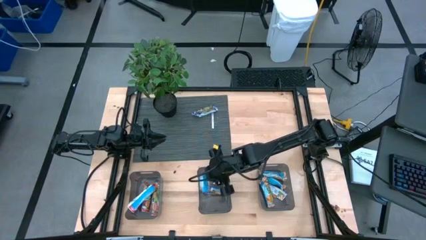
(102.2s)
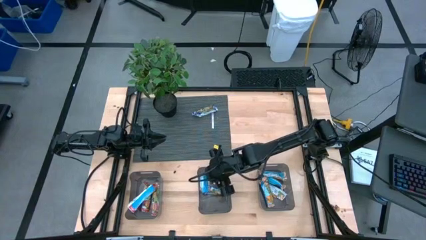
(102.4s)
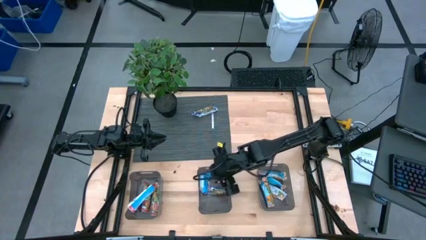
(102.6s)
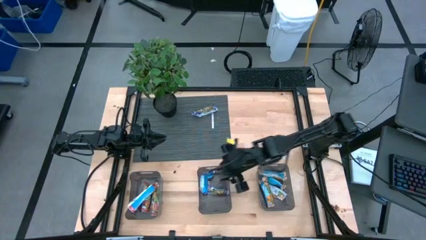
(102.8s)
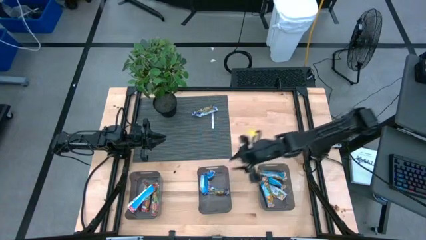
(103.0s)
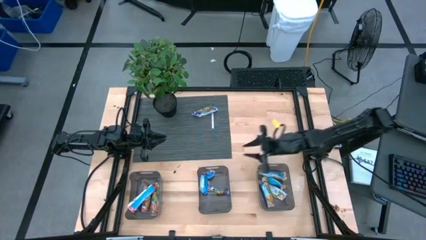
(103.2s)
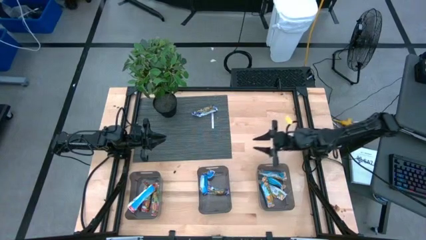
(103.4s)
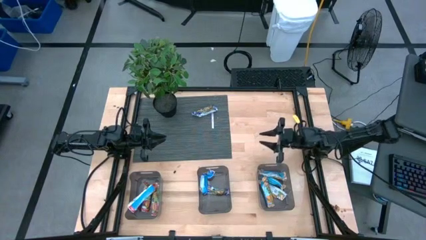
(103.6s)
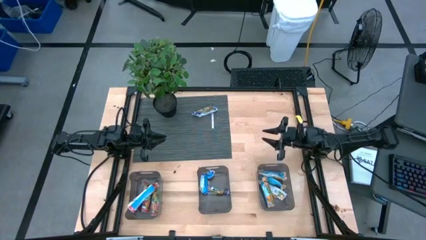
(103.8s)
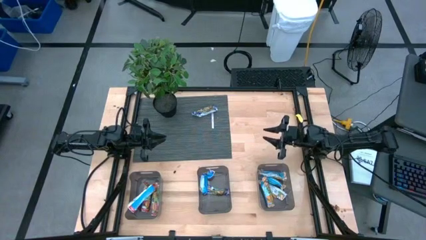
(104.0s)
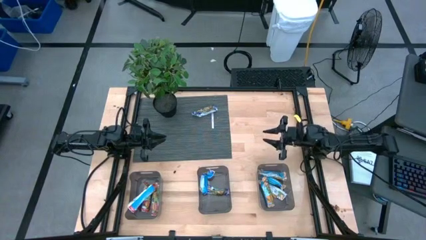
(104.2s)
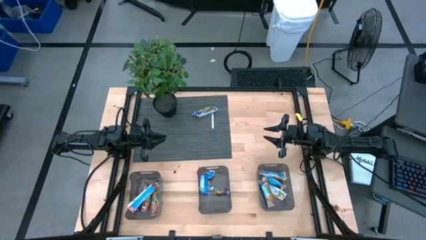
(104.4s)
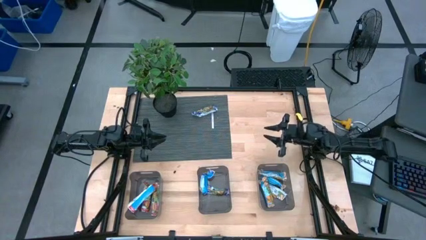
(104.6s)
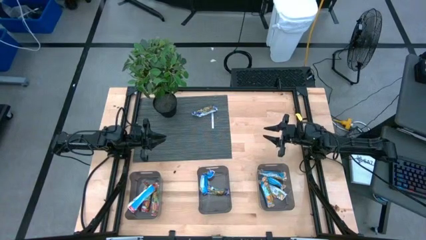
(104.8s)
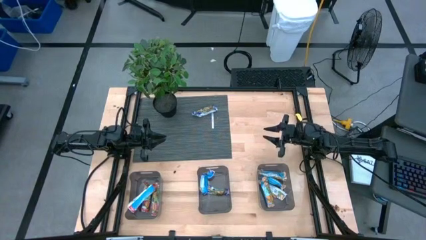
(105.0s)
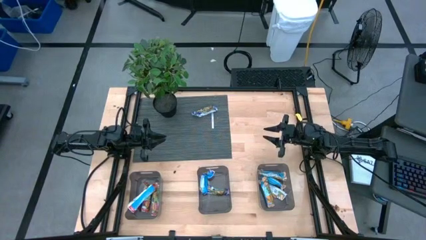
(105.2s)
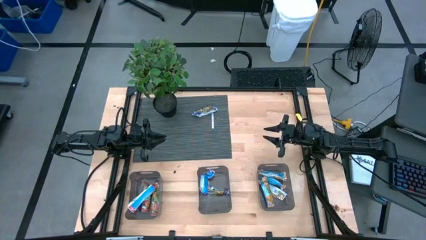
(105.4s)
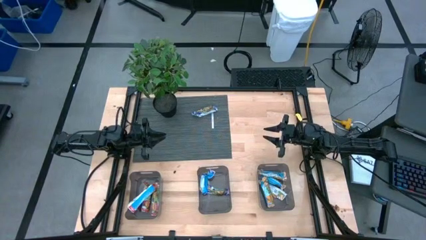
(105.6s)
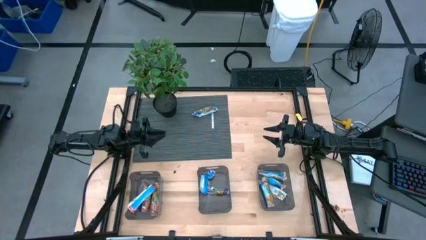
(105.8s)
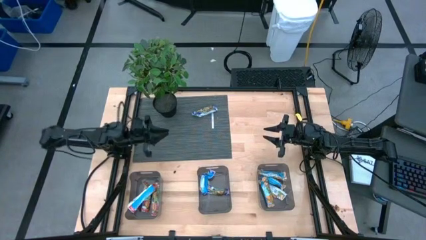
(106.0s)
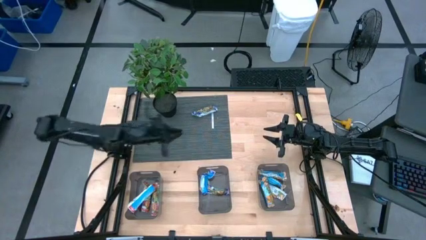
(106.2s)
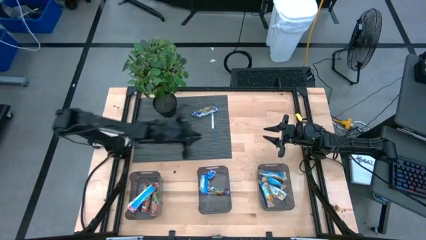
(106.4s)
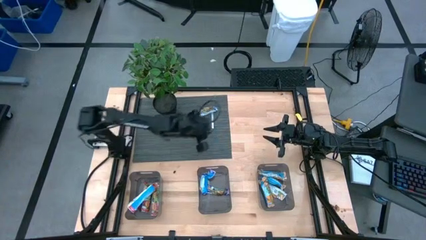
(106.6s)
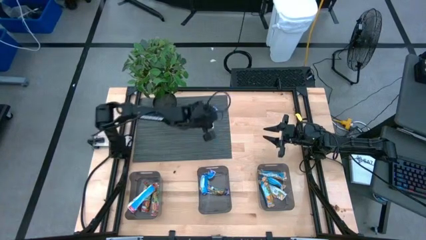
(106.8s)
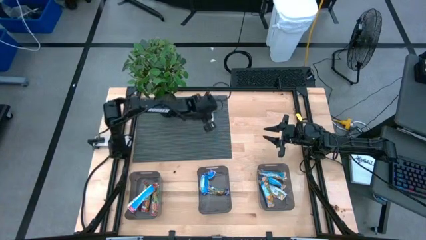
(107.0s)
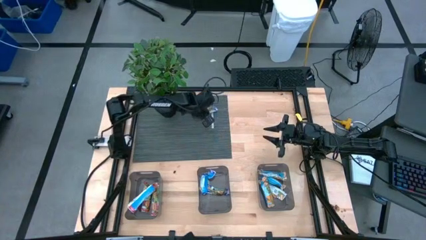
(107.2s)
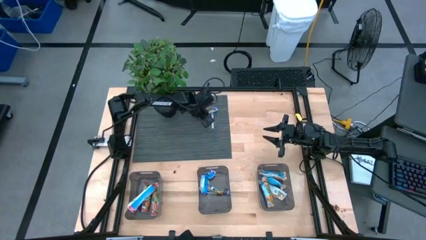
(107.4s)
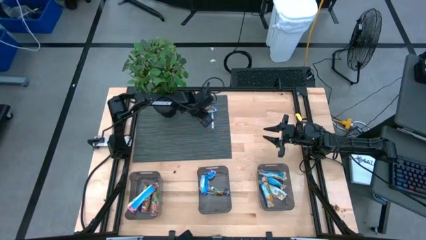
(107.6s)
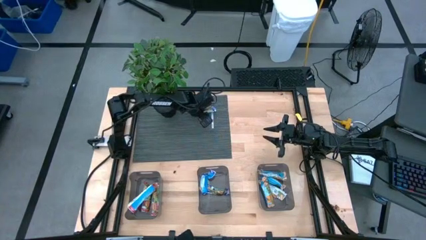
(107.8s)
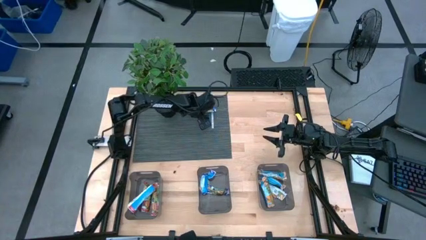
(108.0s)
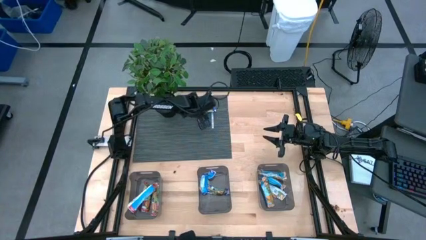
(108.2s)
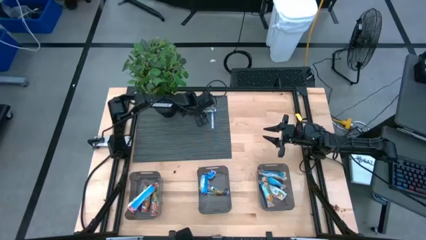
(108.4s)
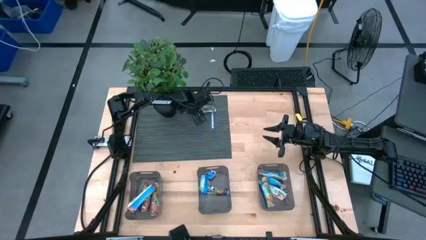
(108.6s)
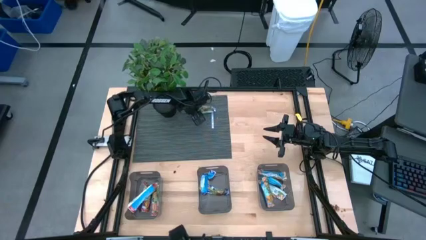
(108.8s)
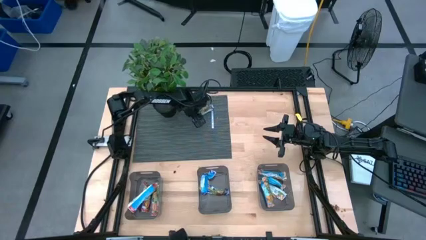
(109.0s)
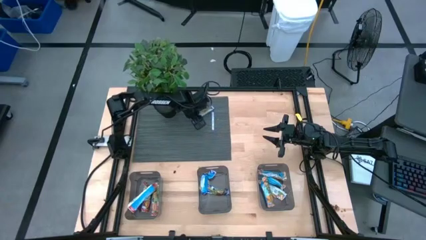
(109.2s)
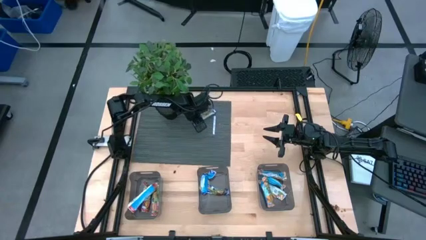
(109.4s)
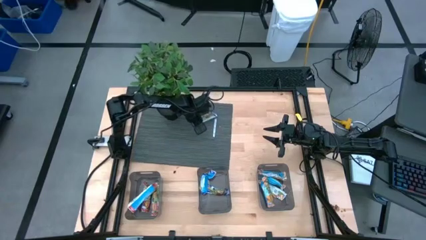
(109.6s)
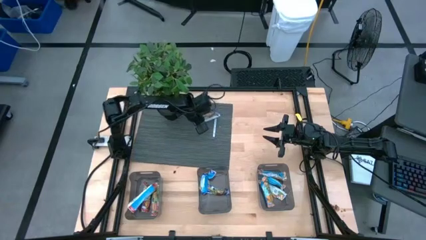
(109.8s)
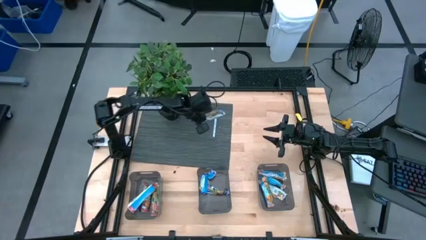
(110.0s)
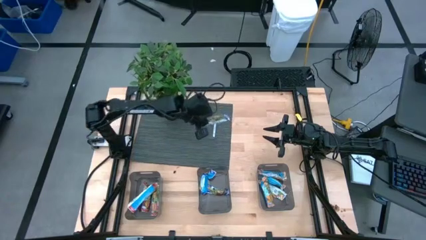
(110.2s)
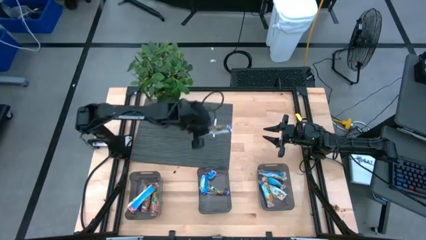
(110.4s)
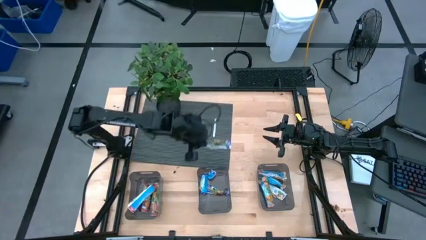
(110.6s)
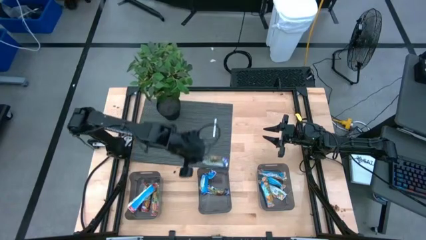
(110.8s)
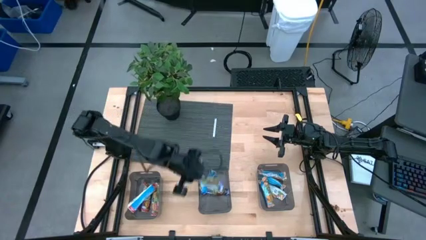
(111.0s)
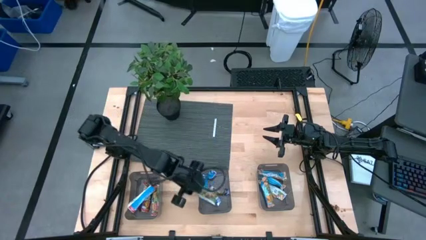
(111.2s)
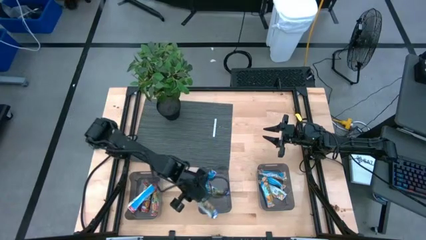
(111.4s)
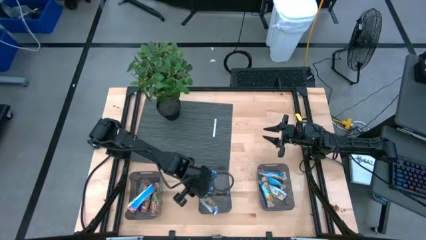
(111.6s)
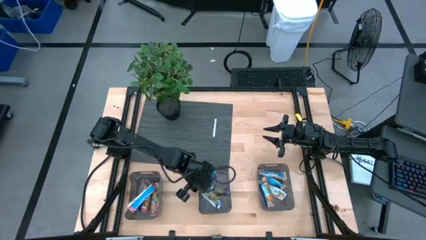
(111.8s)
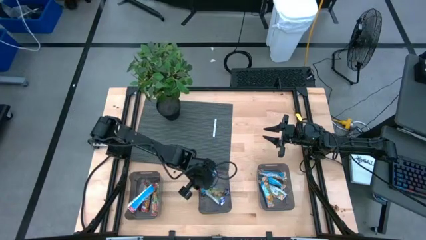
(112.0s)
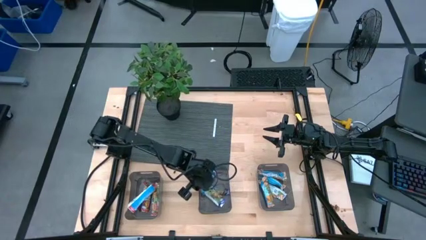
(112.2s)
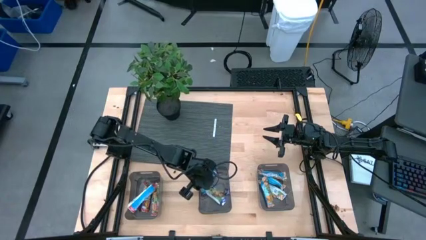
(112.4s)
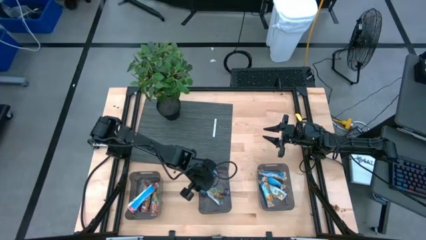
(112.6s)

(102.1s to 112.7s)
Task: Pick and place Granola Bars by type
Put the blue granola bar into the middle black bin

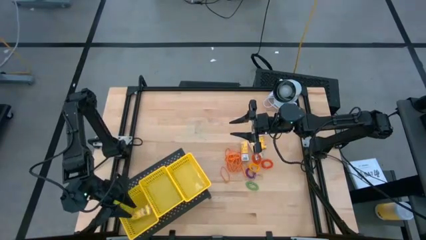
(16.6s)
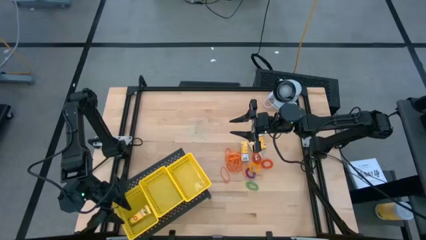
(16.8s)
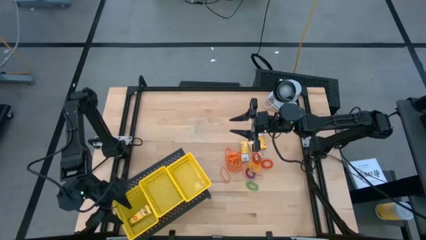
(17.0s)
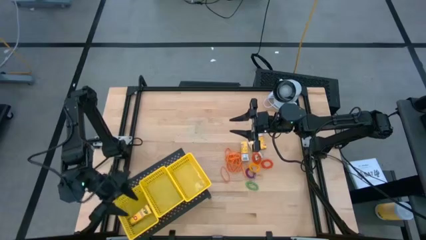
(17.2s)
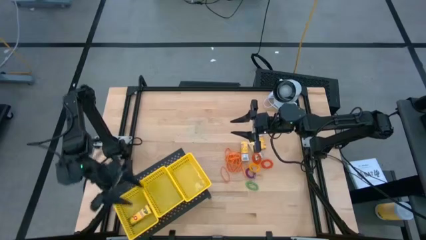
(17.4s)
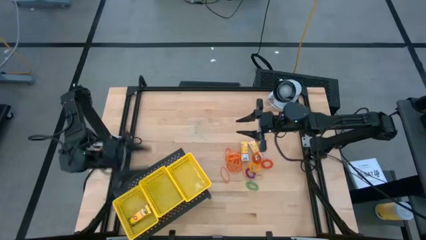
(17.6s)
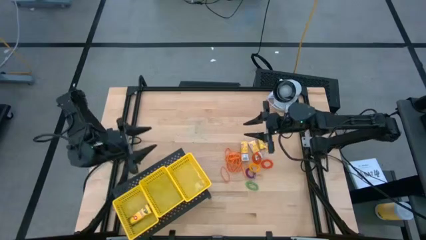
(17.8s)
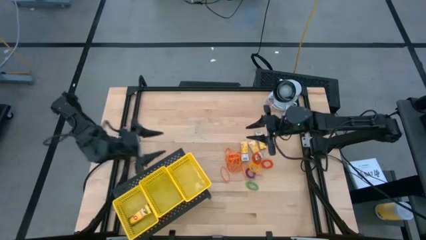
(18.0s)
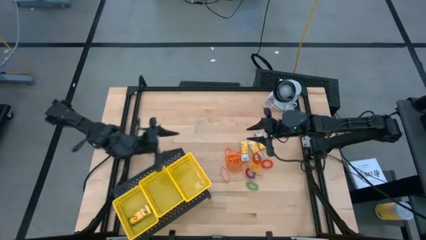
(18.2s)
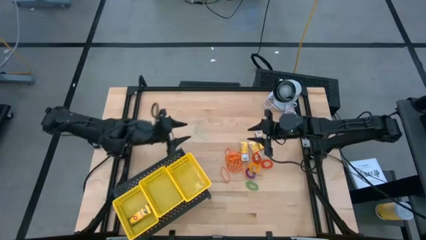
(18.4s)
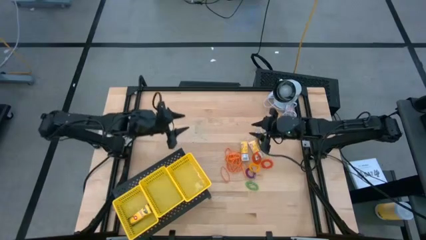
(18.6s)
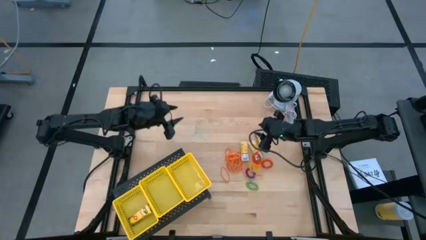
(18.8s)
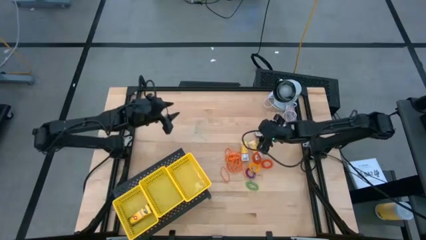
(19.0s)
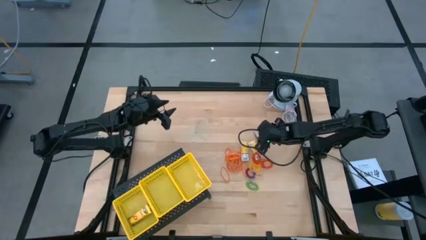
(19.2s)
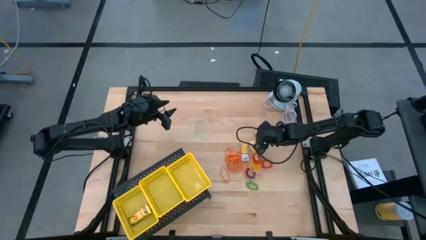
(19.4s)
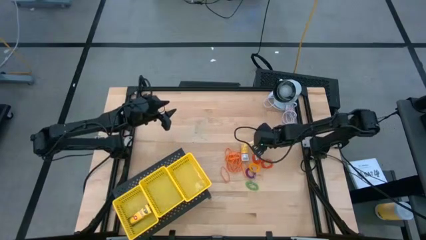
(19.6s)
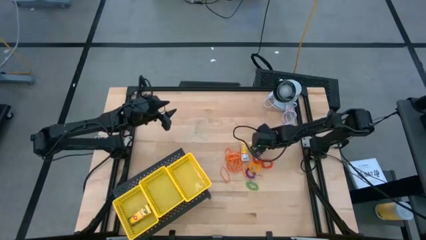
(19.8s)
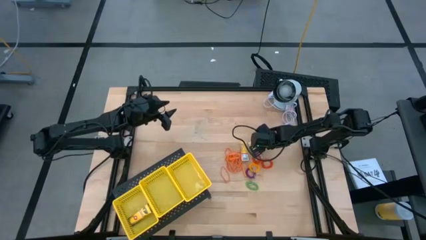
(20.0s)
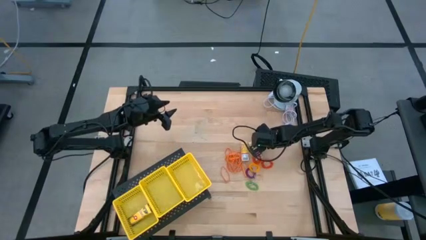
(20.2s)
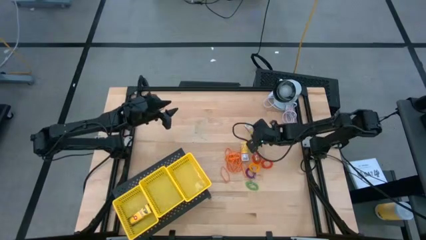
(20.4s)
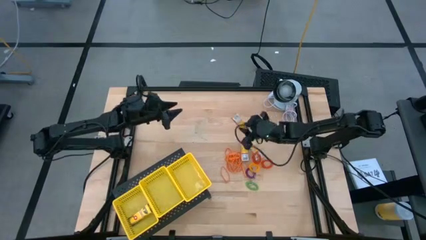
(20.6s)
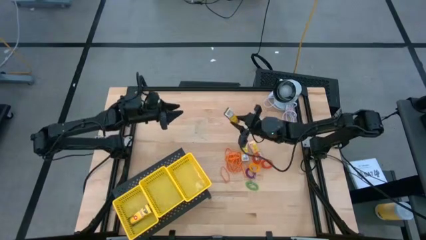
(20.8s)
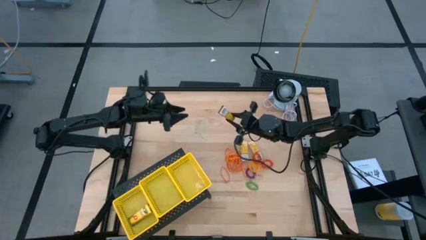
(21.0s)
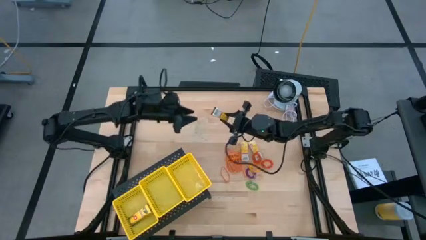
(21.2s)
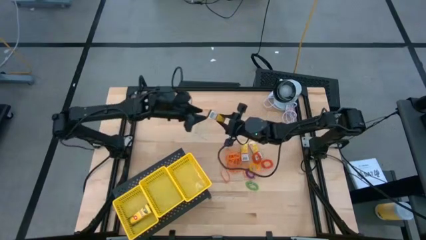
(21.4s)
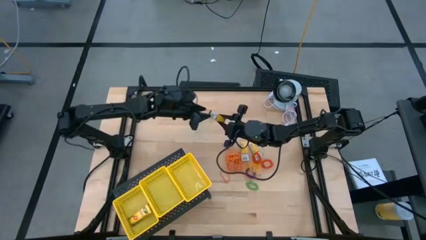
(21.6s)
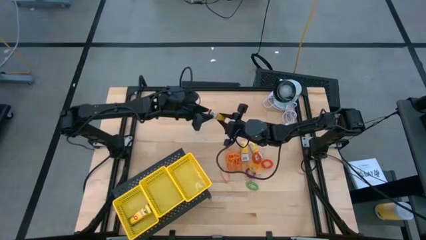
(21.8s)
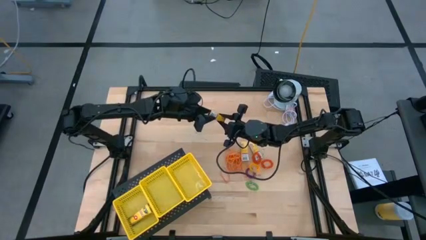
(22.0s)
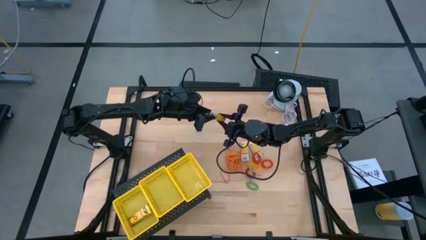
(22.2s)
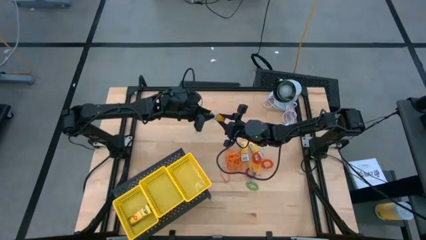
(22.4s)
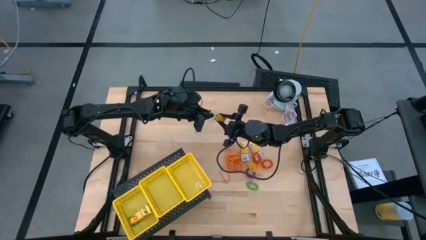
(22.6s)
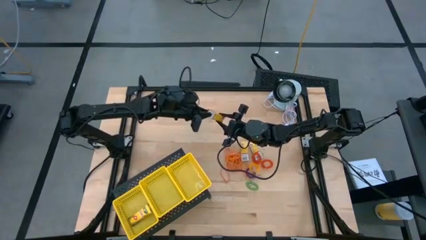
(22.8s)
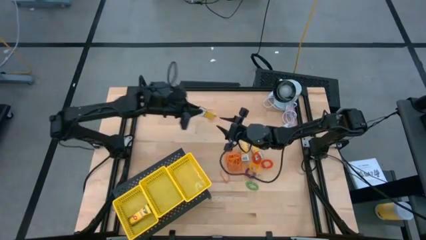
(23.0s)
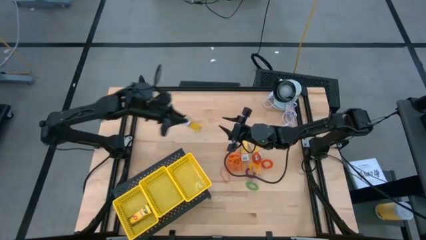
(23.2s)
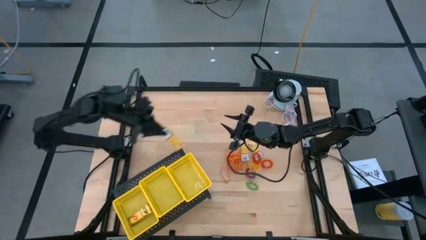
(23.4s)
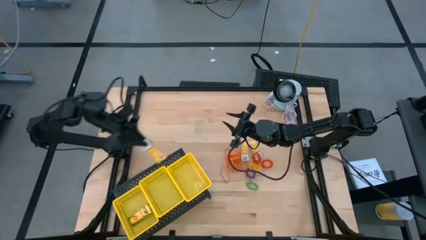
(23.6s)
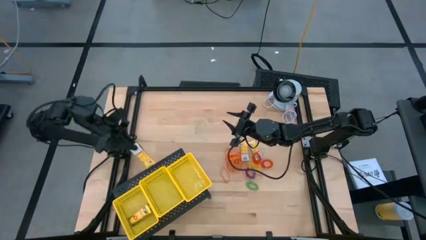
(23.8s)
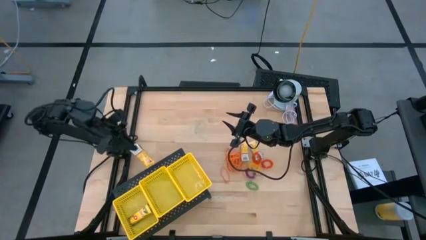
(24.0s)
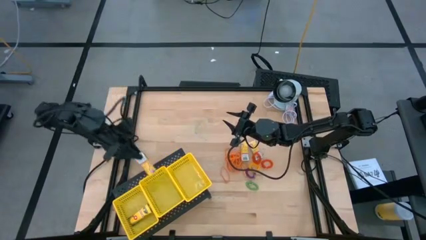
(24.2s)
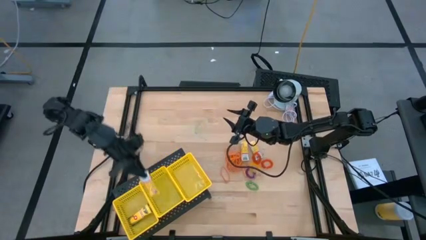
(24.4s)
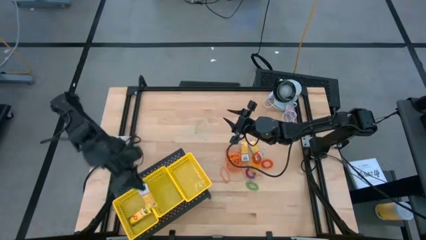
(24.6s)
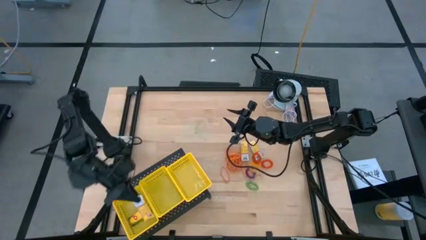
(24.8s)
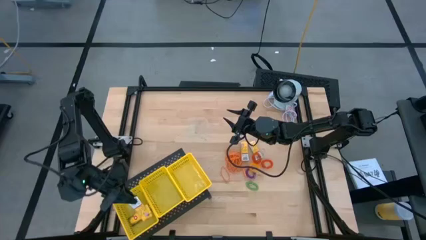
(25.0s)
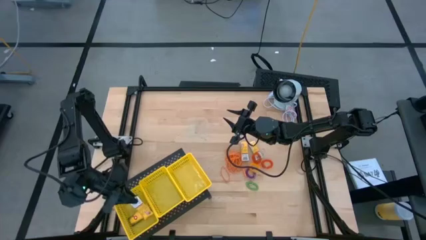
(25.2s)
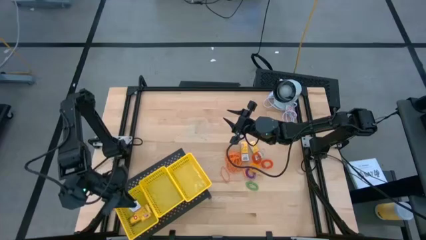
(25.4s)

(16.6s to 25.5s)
Task: Pick & Place Office Desk Supplies
Put the crayon box into the left yellow bin on the shelf
